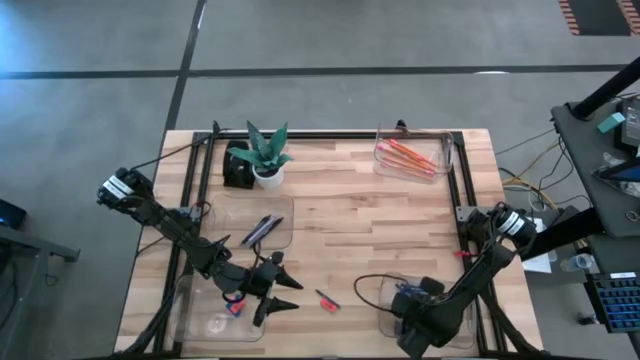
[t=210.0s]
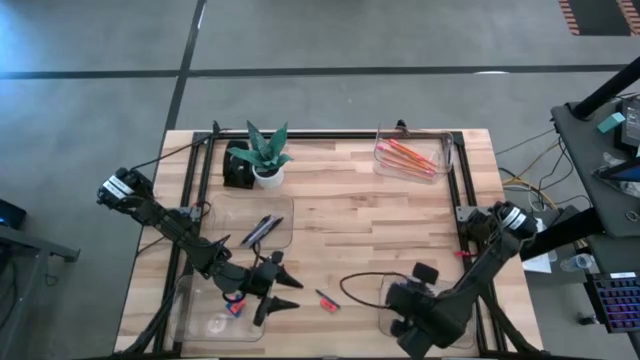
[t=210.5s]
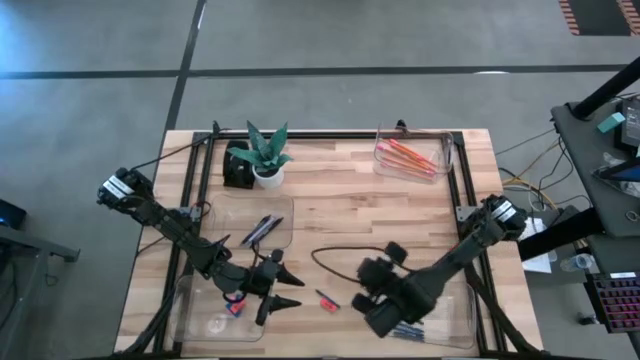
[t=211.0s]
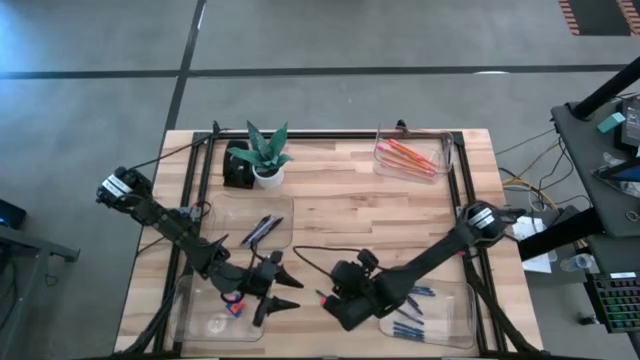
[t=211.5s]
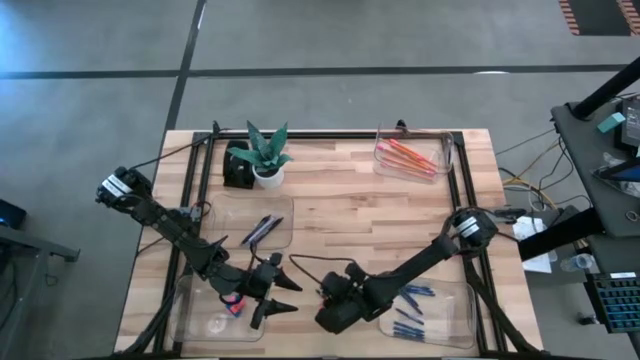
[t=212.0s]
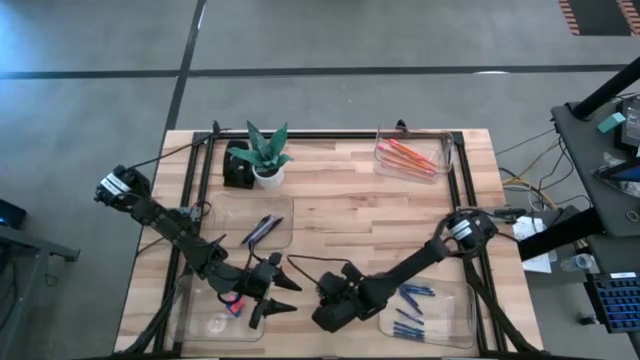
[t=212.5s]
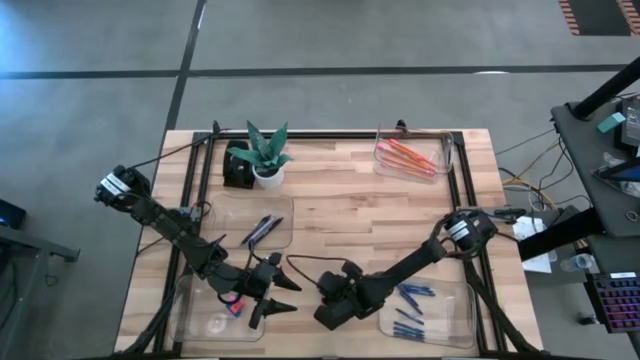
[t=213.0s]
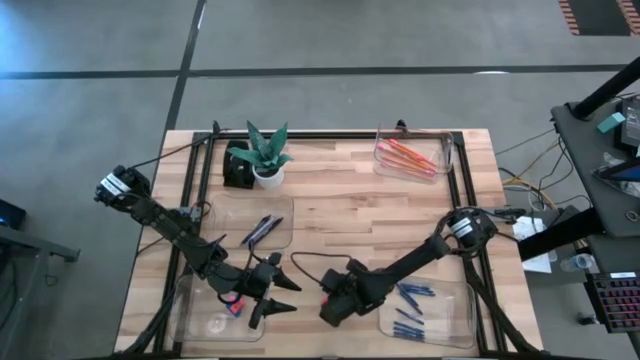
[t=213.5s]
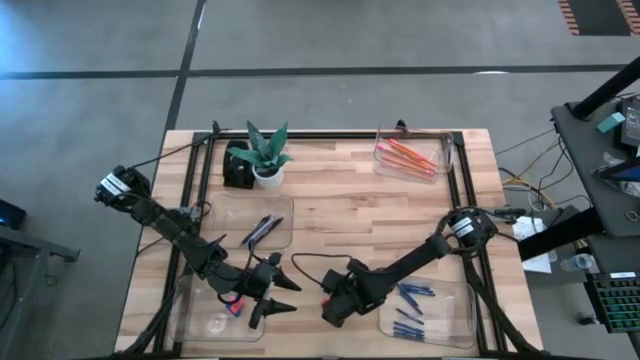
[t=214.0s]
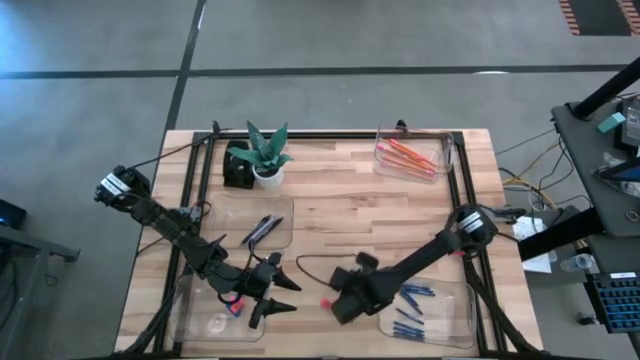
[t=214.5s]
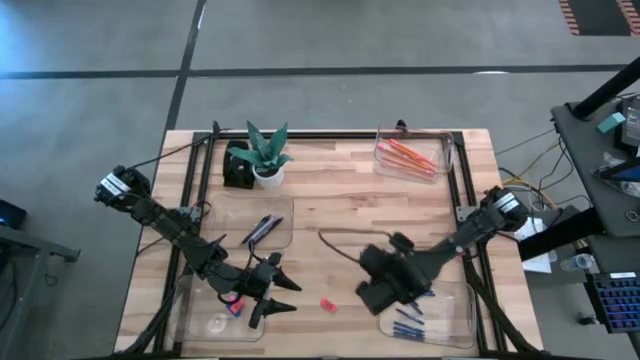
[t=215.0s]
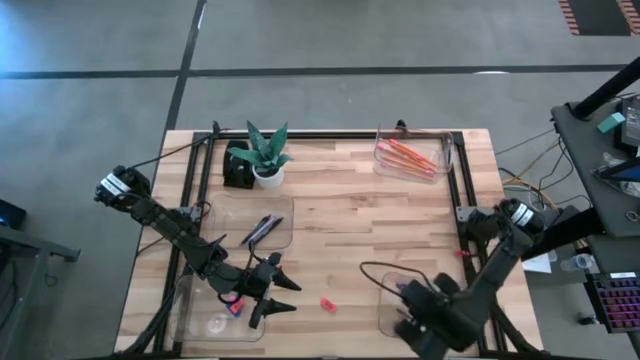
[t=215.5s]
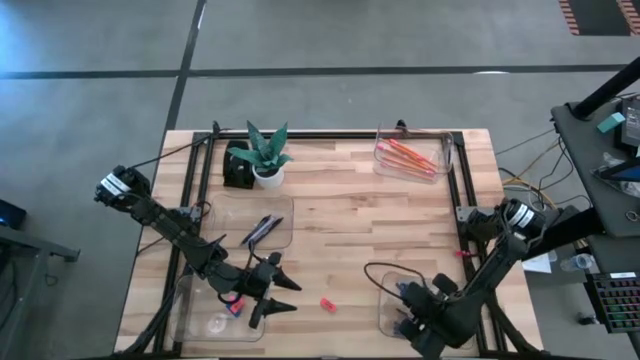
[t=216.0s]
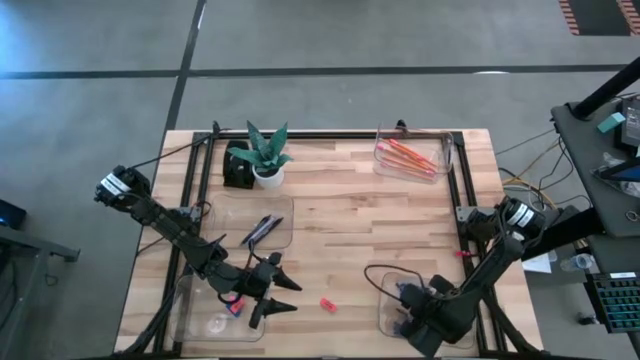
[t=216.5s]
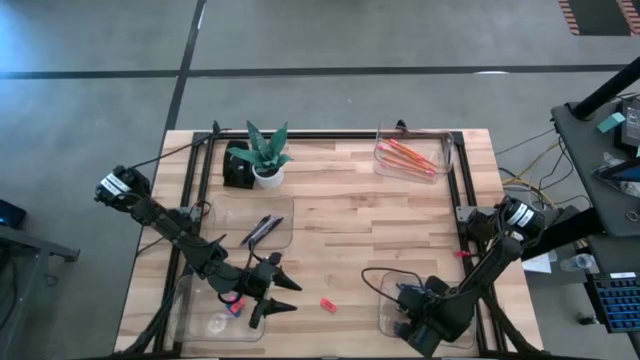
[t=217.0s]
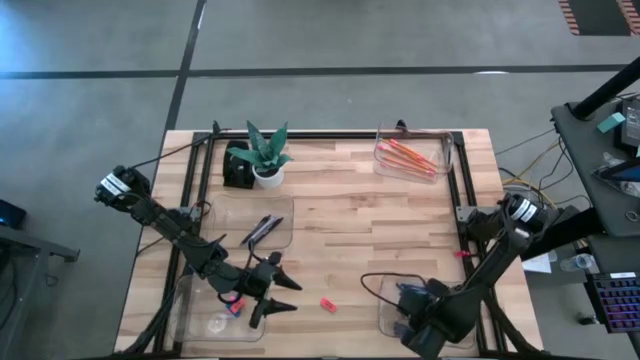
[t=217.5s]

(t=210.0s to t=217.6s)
Task: Sort crayons/erasers/pens/pencils in bins
Put the blue crayon into the bottom right transparent bin

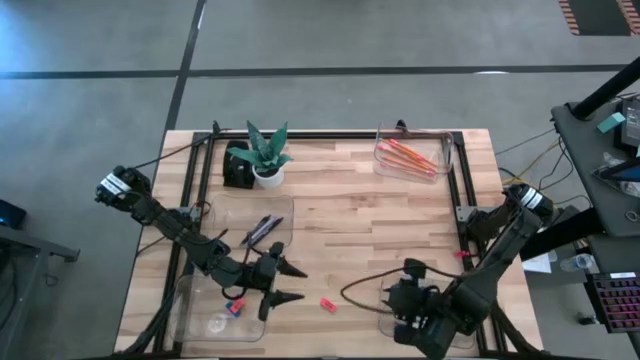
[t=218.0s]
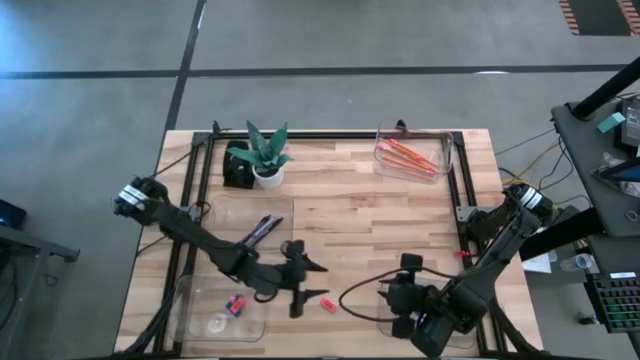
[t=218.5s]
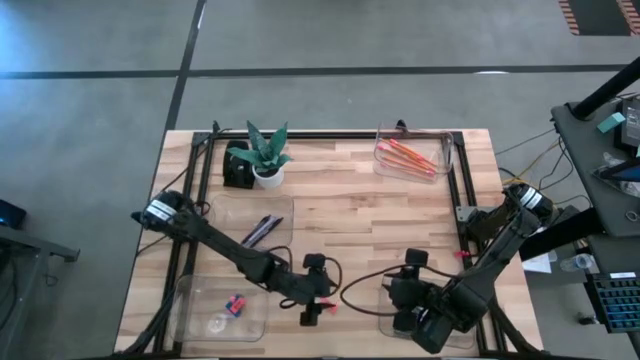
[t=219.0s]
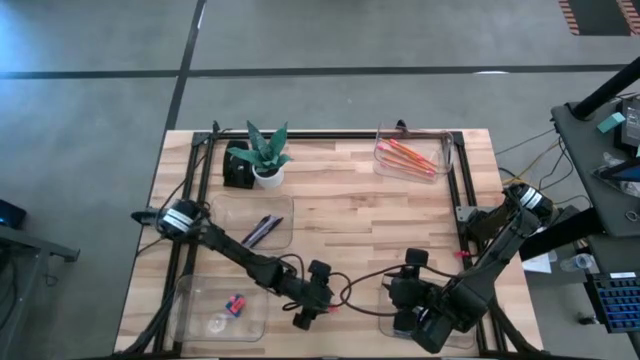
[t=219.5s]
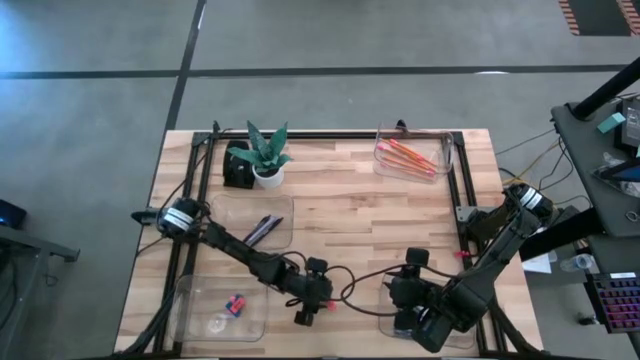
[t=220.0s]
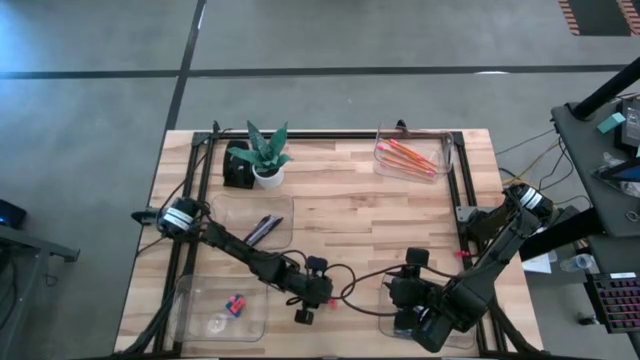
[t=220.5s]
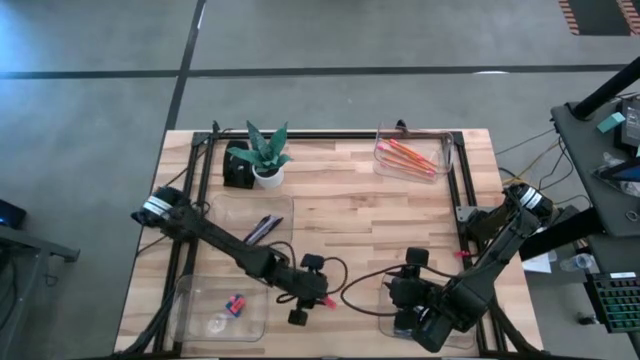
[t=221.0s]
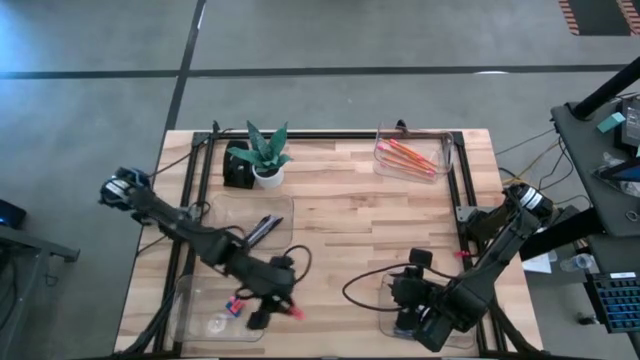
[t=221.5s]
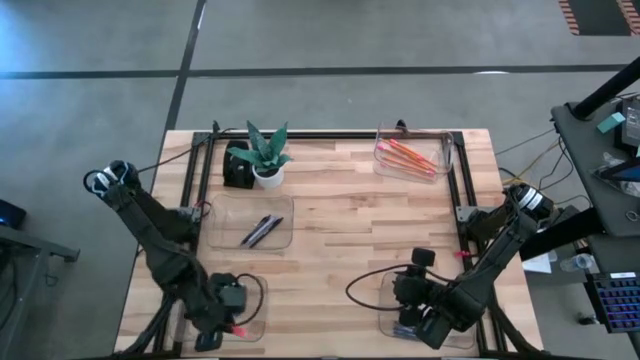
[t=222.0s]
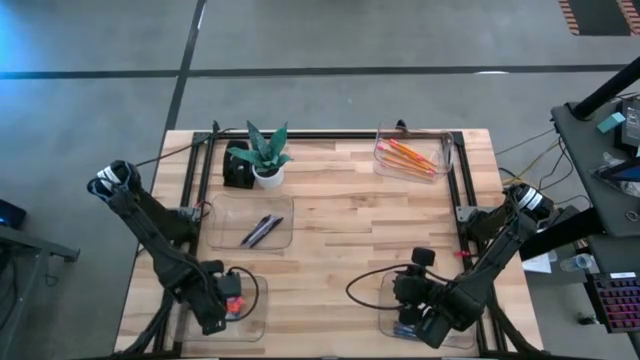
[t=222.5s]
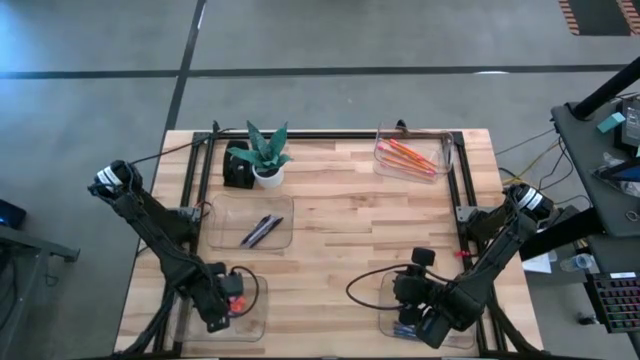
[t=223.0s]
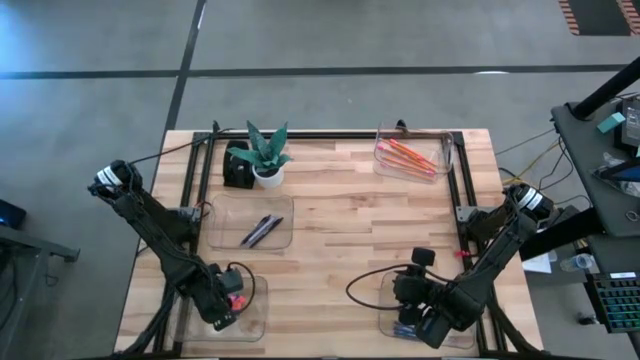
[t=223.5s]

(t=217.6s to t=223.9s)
Put the center orange eraser into the bottom left transparent bin

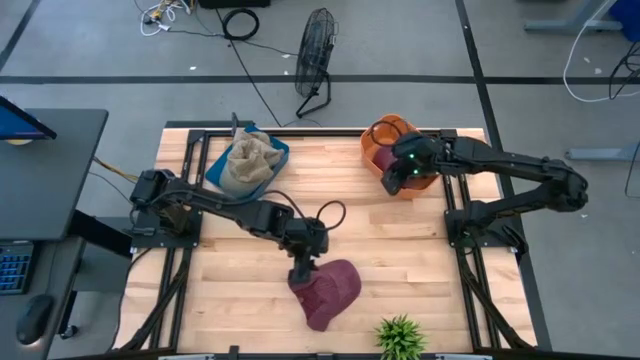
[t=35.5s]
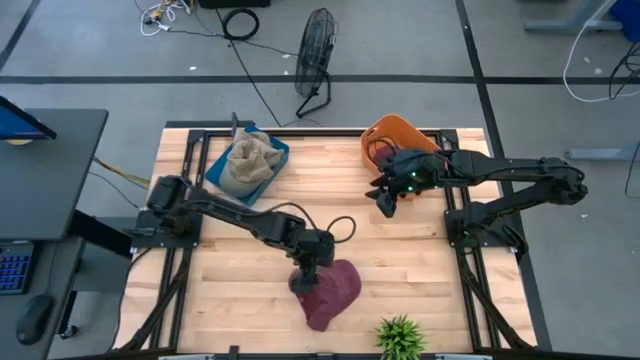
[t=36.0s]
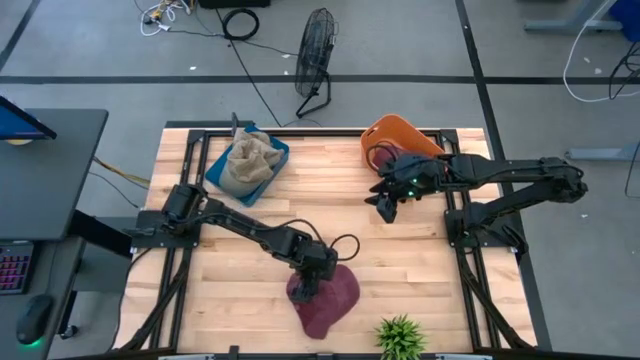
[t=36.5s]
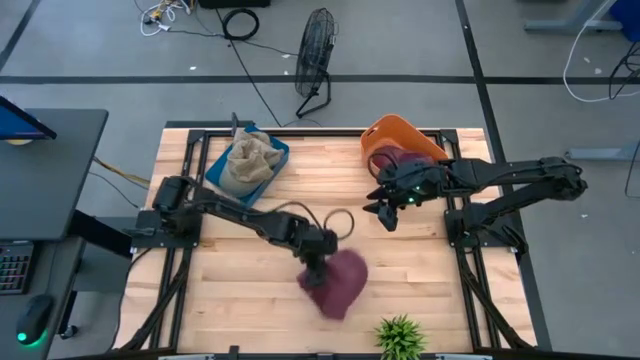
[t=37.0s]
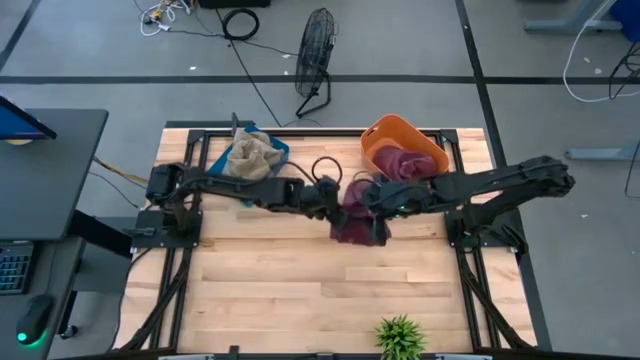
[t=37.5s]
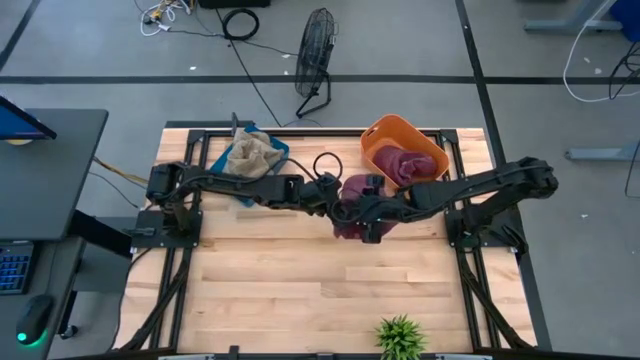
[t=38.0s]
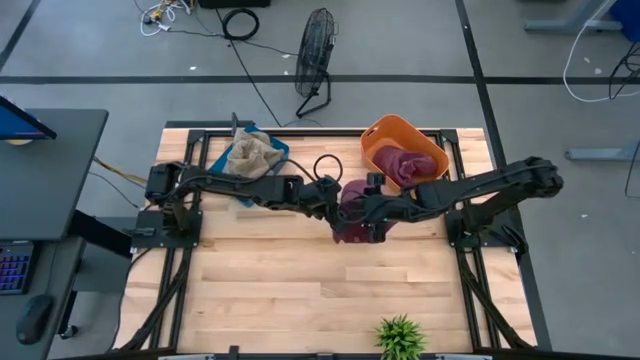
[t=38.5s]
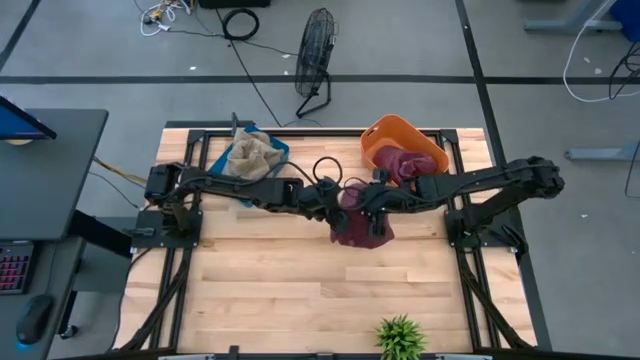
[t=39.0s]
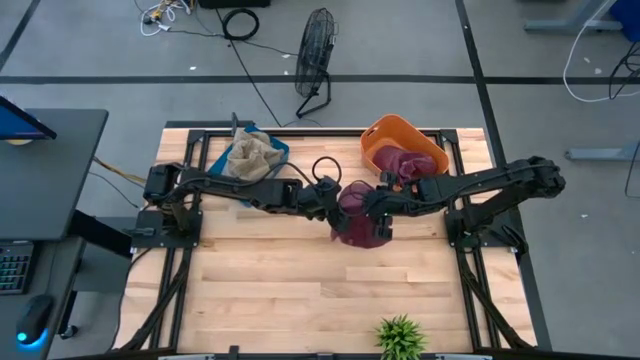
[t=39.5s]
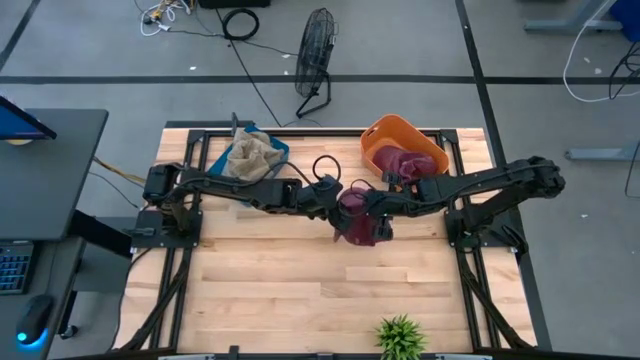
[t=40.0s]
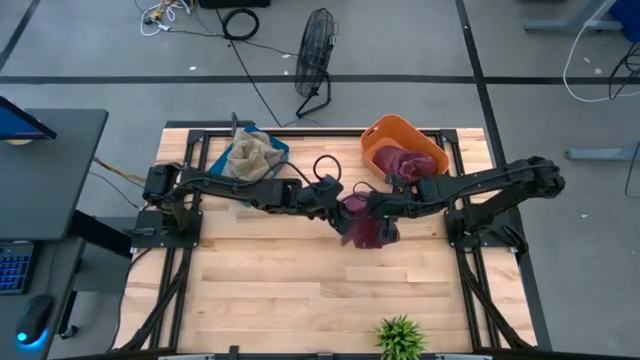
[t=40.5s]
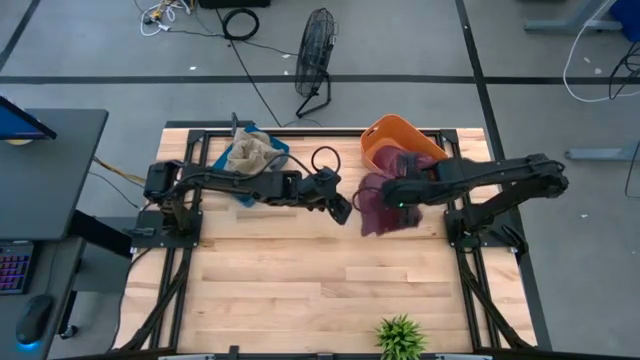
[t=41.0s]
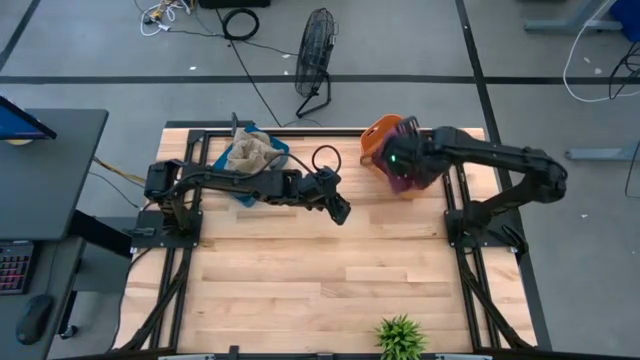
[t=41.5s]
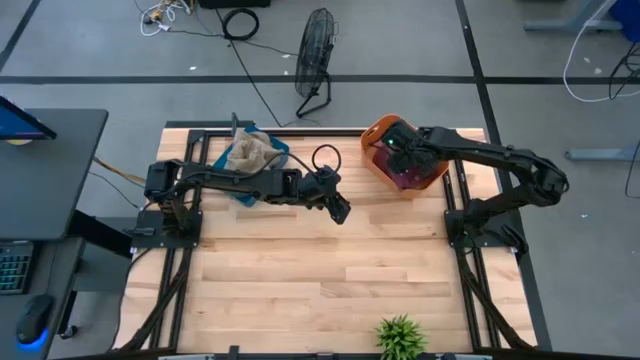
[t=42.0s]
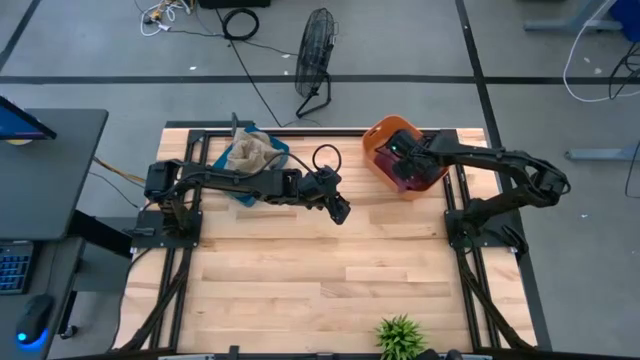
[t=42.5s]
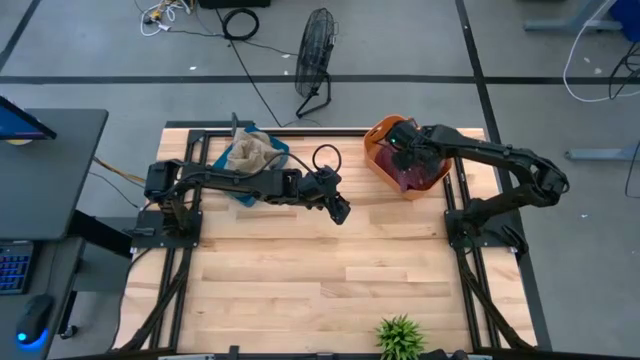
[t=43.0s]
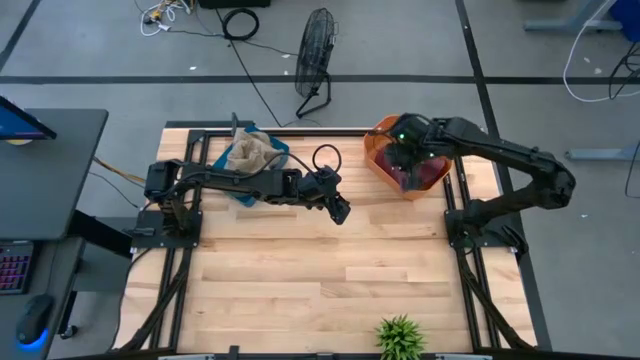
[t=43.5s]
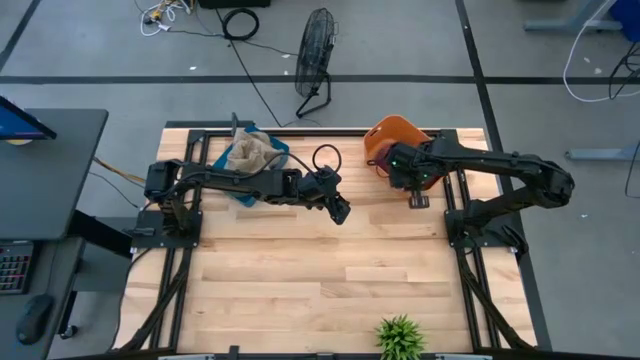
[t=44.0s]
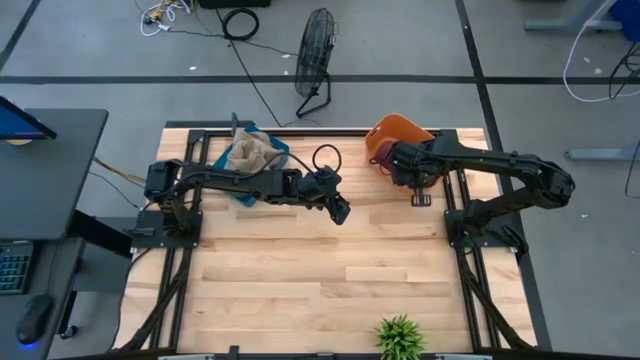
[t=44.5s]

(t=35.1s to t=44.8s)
Task: Pick & Place hat
Put the red cap into the orange bin
